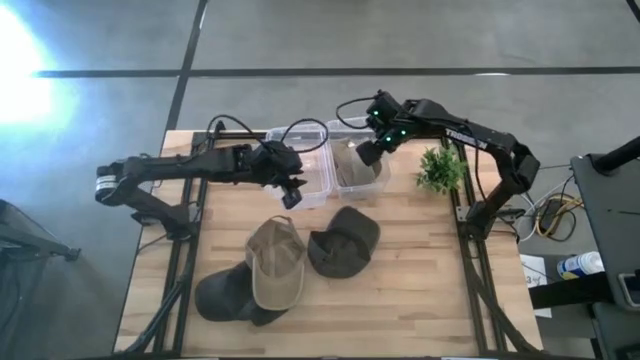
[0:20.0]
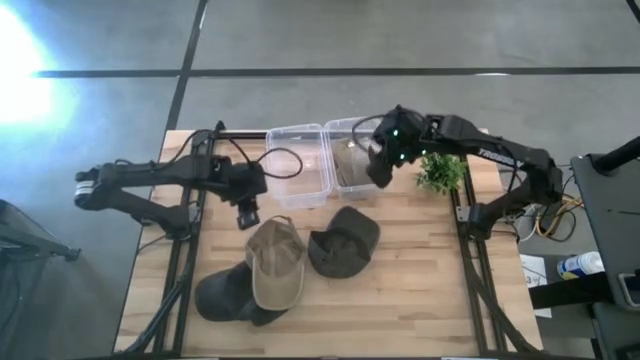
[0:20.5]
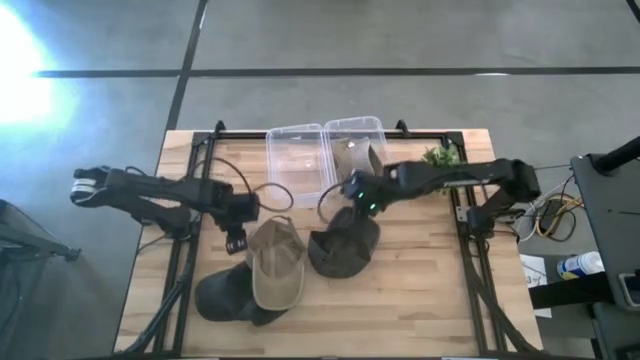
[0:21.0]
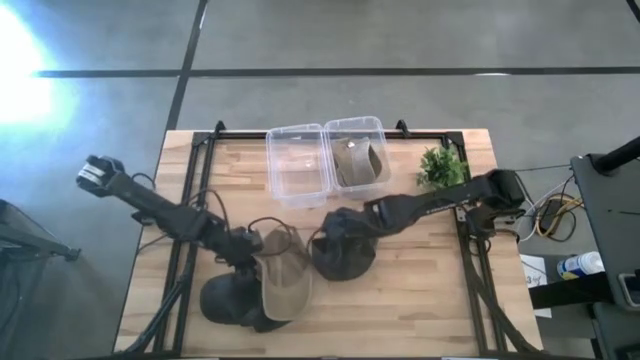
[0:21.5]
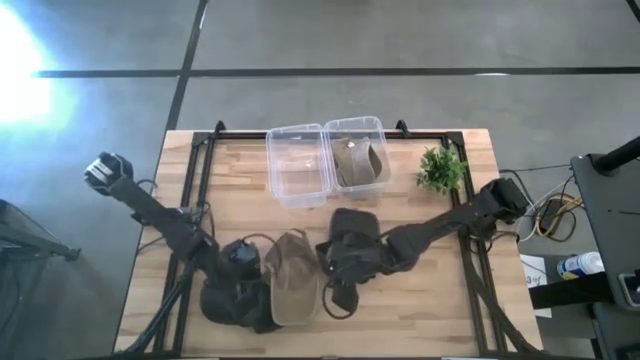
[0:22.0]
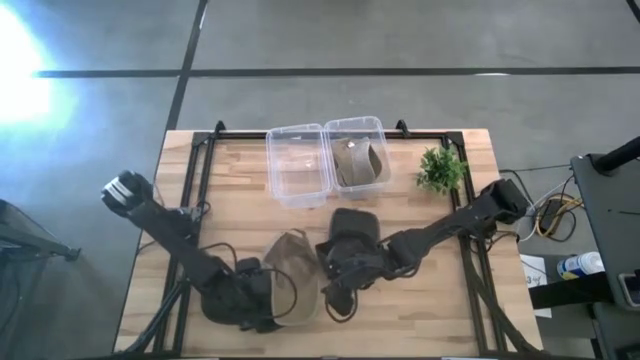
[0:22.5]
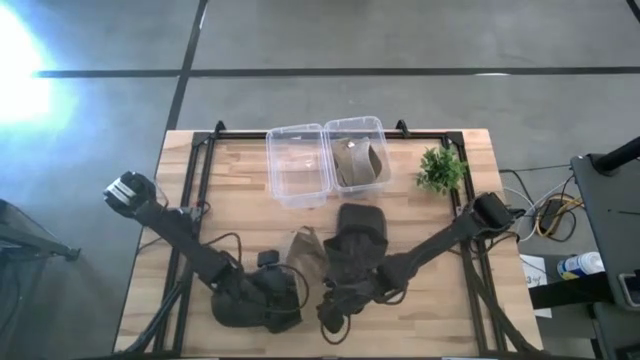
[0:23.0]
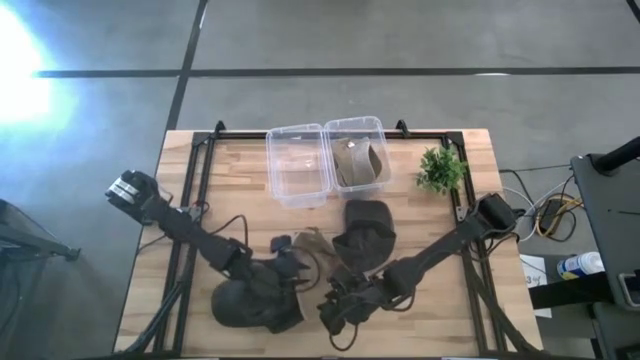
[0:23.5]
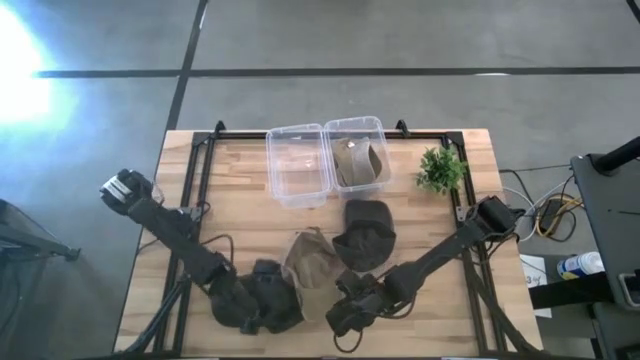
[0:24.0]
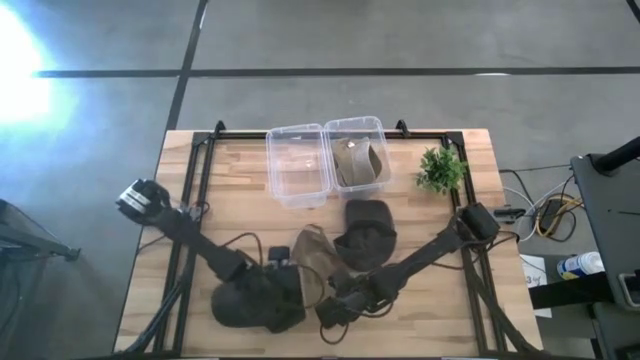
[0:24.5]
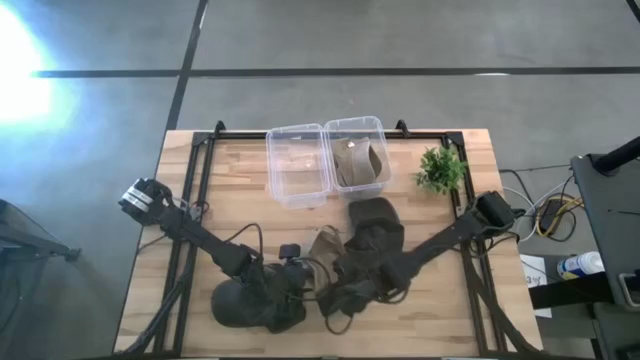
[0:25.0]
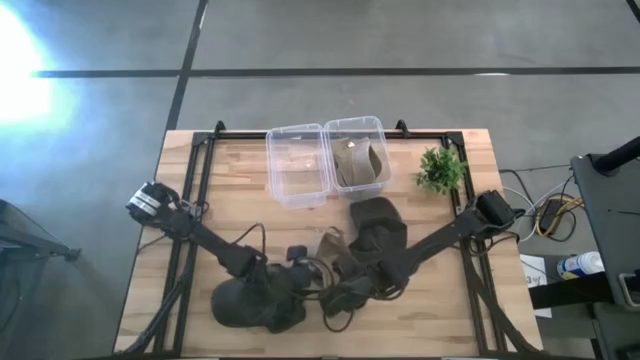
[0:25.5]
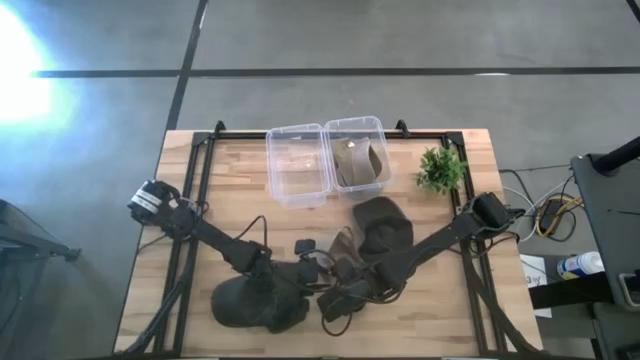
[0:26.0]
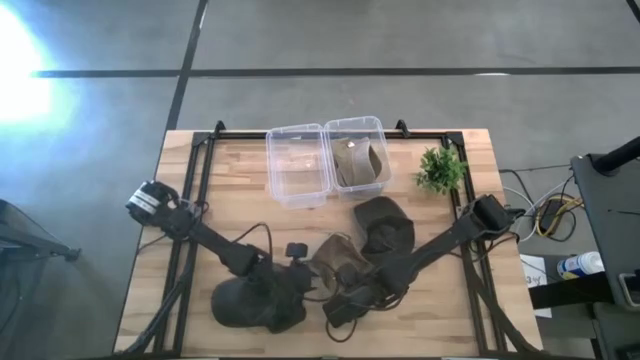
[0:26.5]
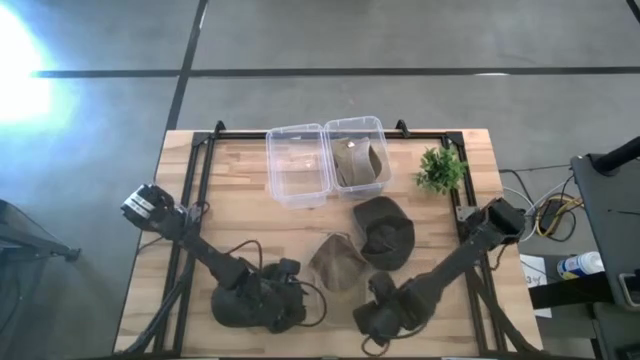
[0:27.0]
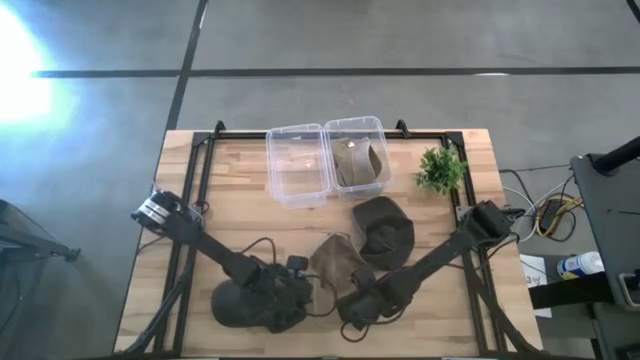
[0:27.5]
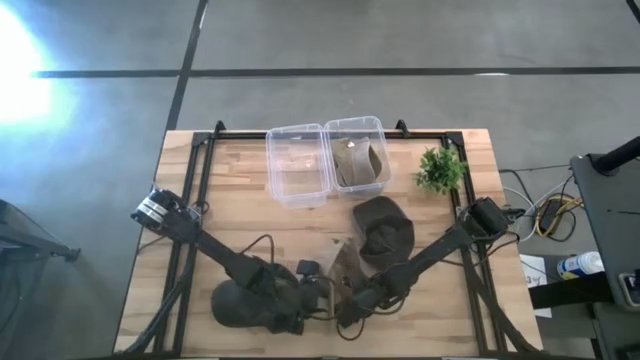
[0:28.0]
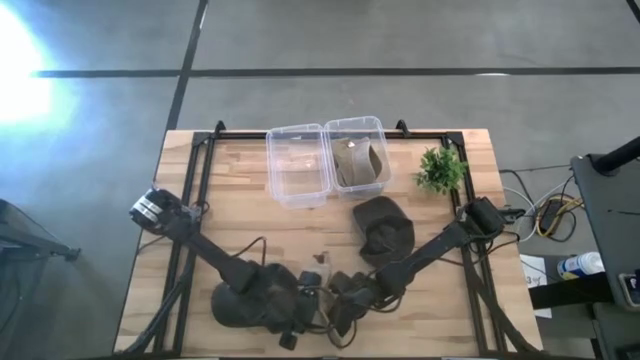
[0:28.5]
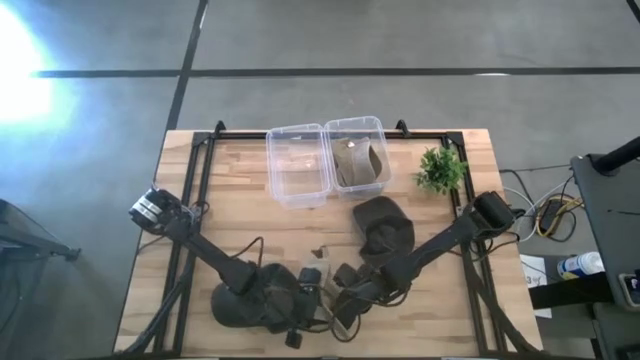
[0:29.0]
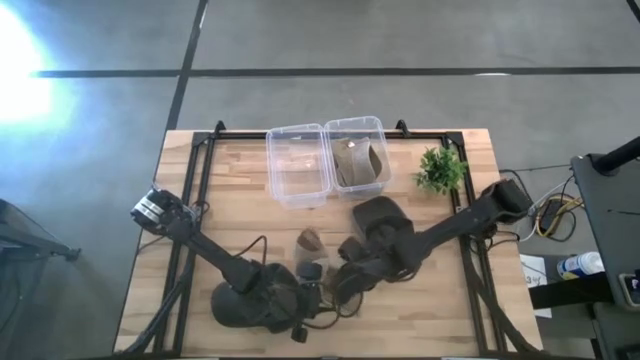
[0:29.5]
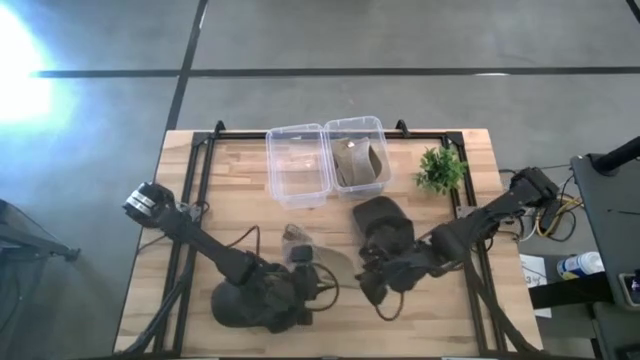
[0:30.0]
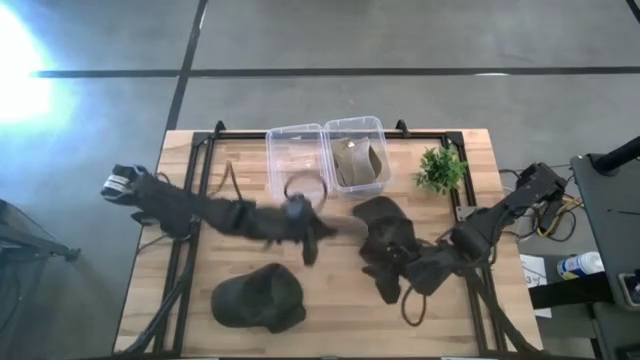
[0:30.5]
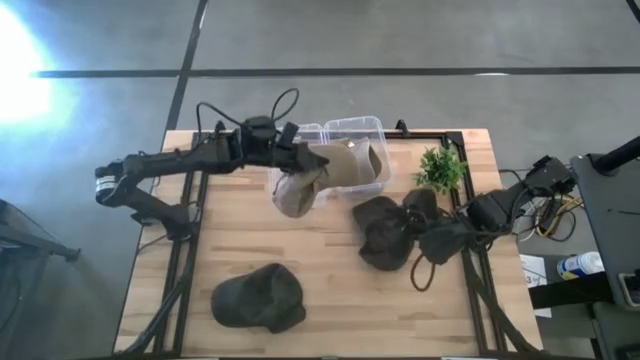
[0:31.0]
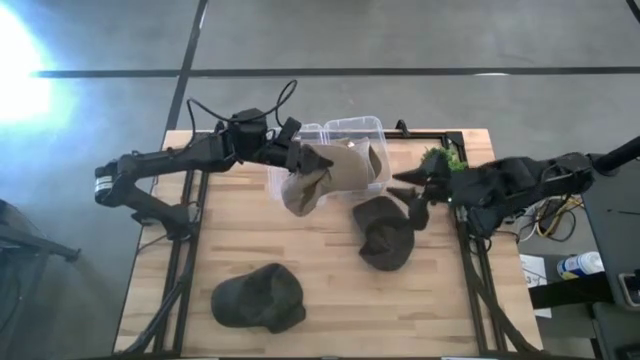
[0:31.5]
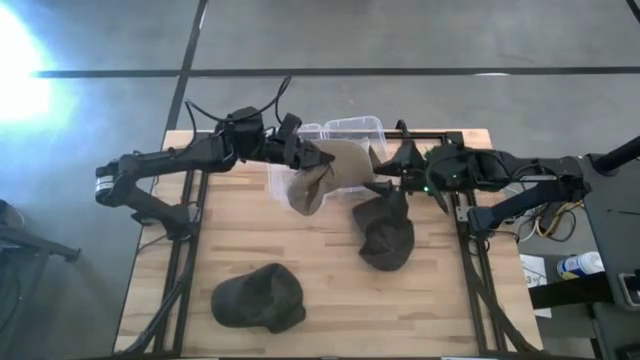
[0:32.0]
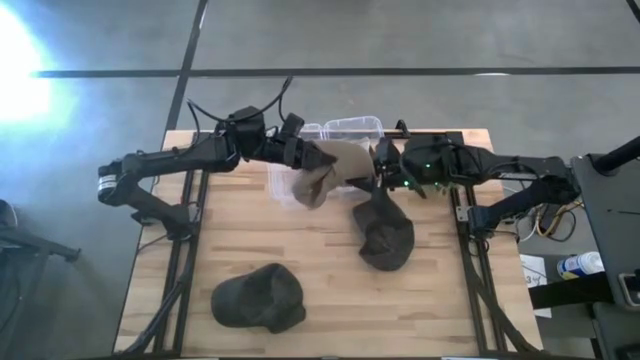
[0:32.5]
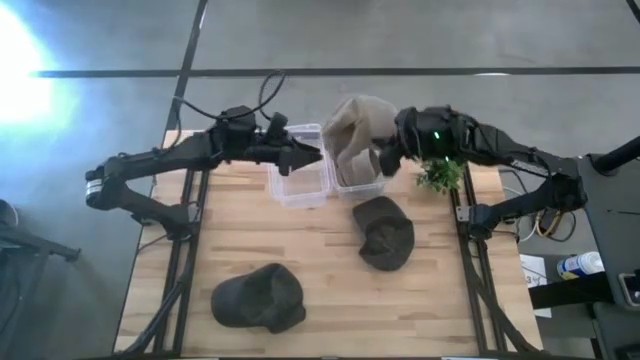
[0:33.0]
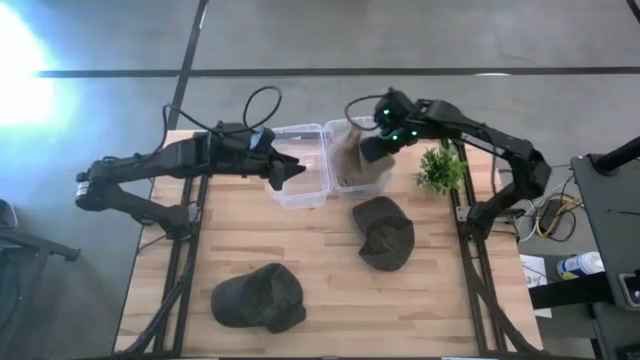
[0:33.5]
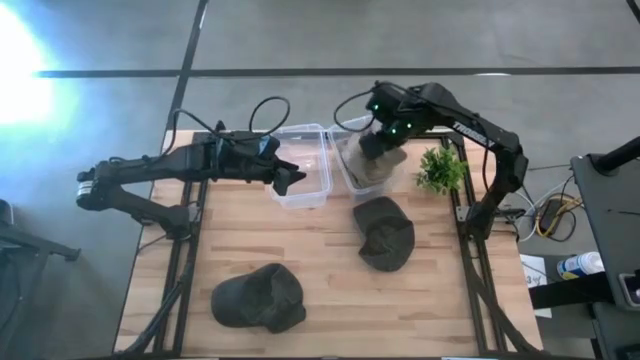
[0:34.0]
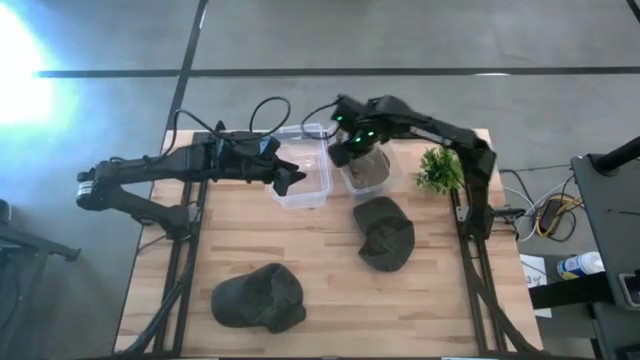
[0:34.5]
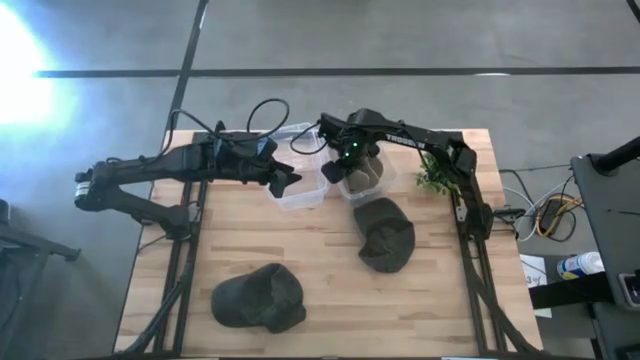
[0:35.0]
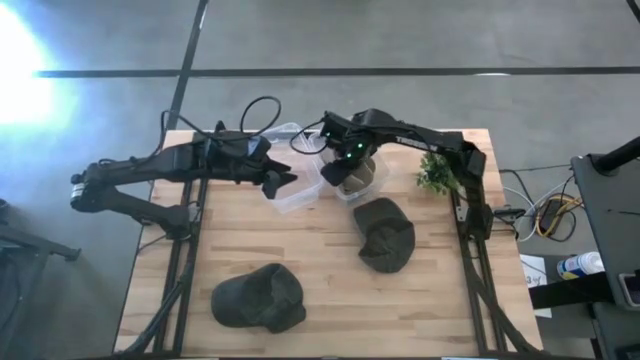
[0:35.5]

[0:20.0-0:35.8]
Task: Pick & Place hat
Put the brown cap into the right transparent bin

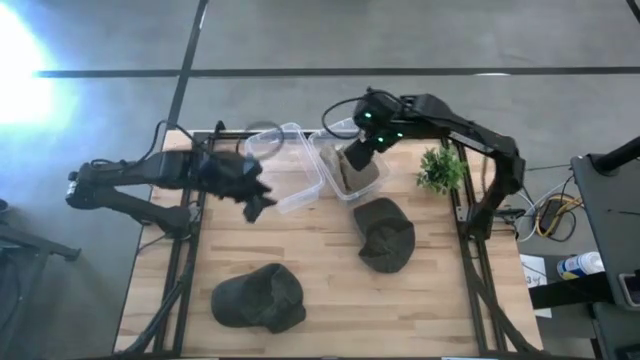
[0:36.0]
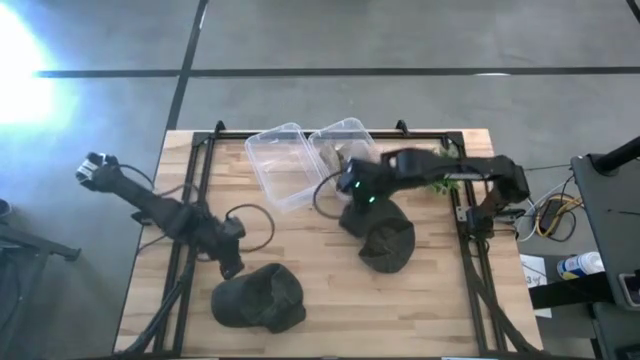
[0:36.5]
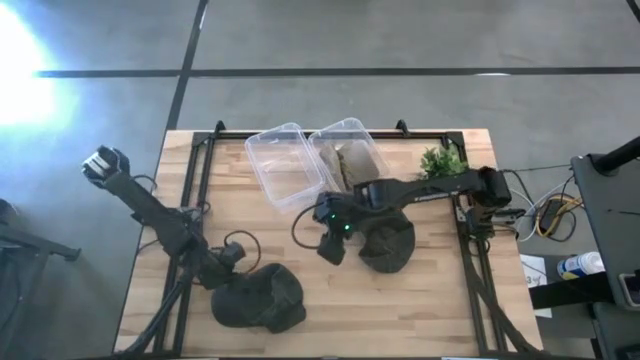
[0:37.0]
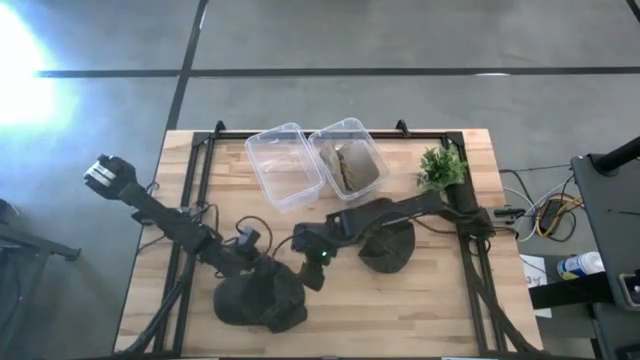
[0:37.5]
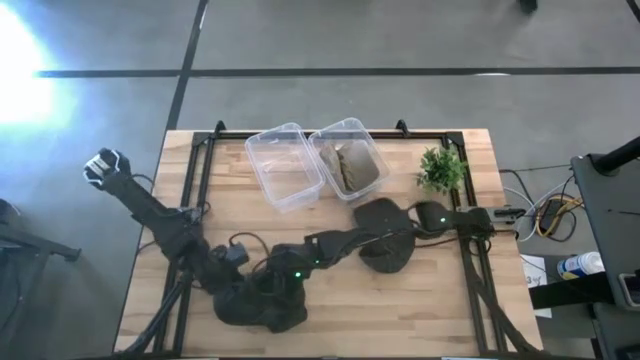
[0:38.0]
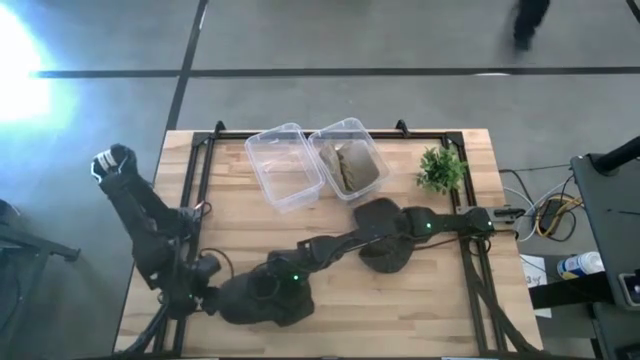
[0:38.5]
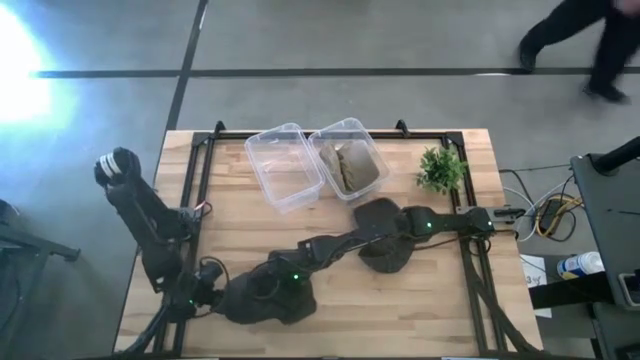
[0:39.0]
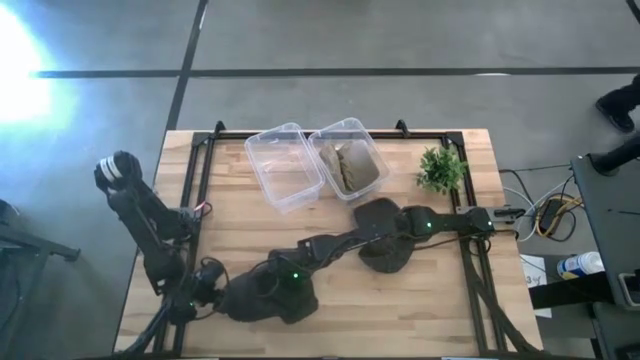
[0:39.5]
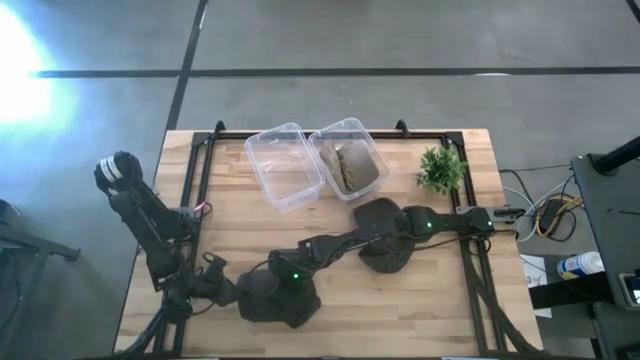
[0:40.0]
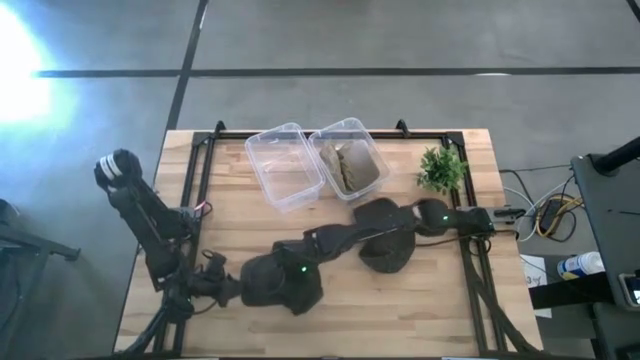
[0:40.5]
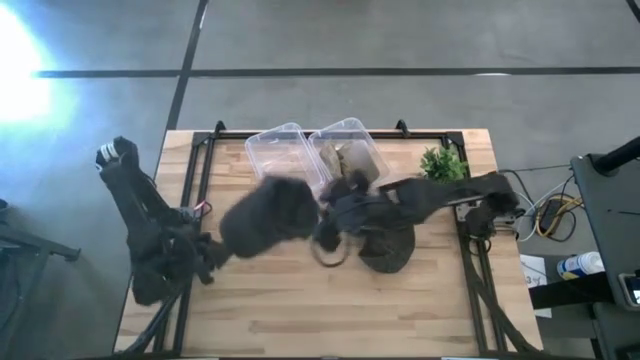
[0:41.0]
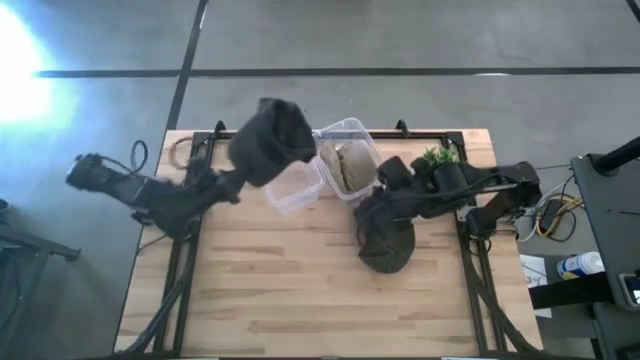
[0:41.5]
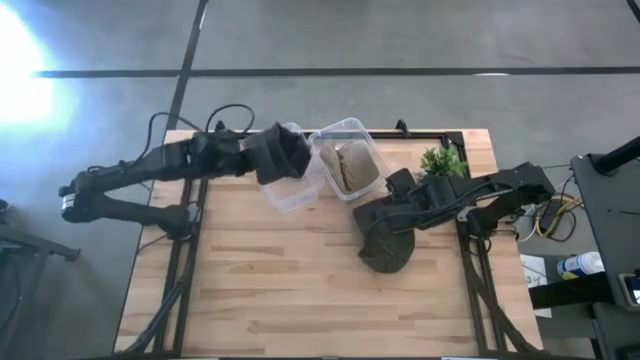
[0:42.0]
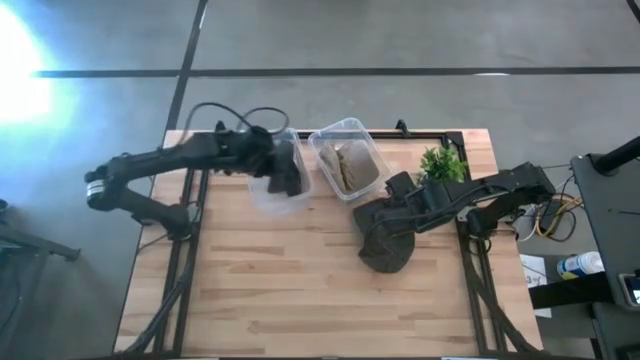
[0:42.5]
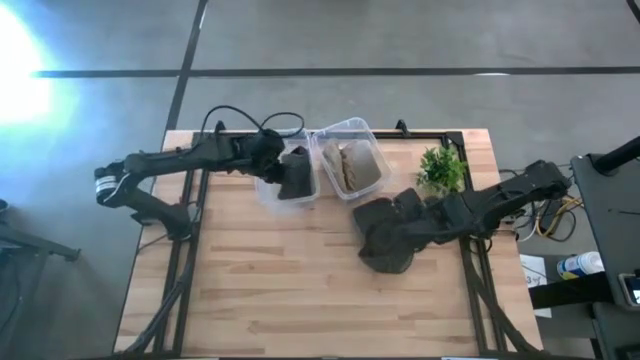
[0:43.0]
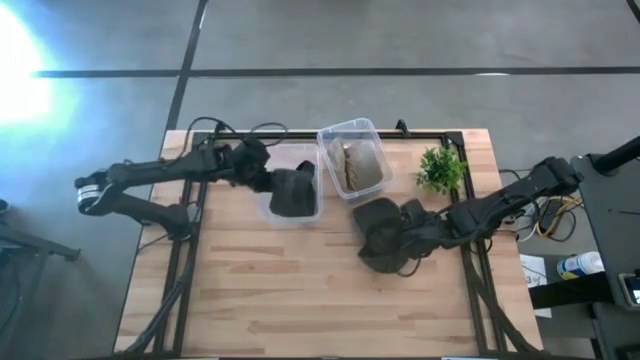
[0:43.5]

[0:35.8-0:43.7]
Put the bottom black cap into the left transparent bin
